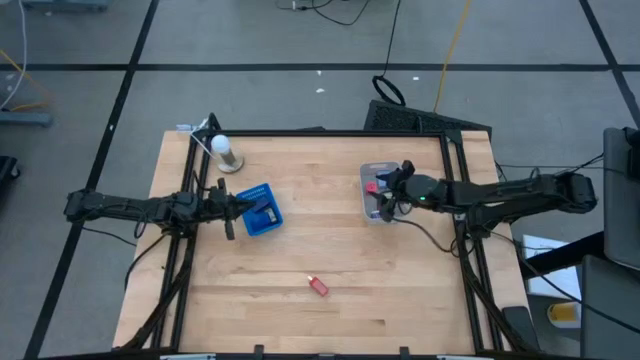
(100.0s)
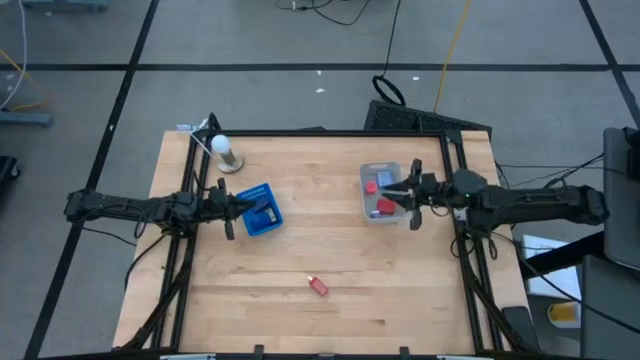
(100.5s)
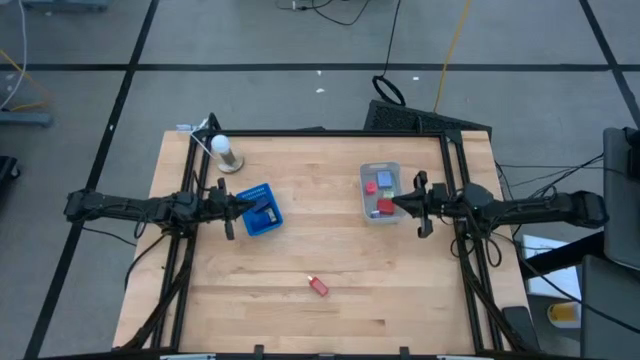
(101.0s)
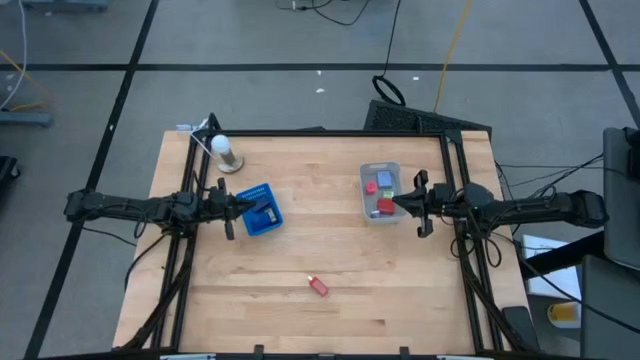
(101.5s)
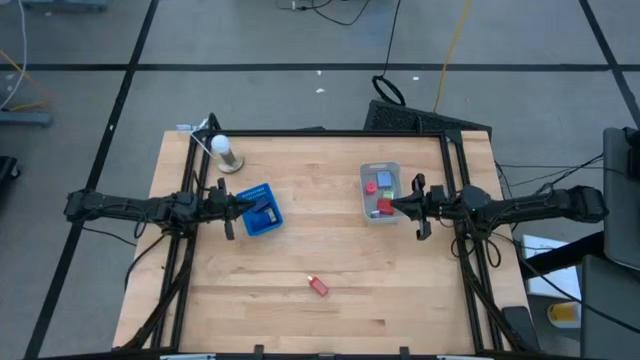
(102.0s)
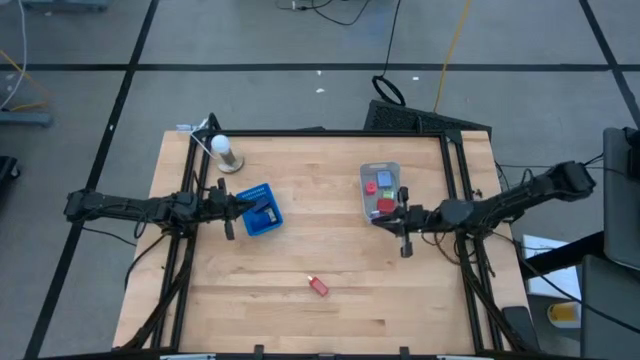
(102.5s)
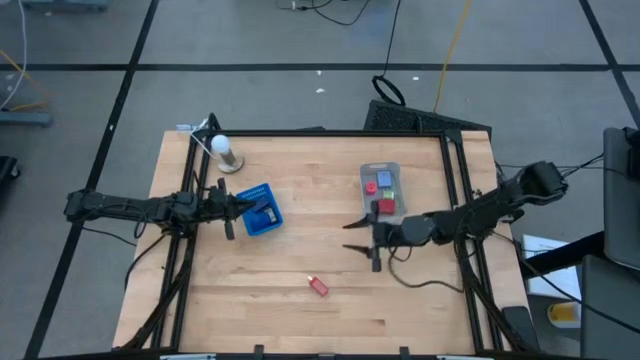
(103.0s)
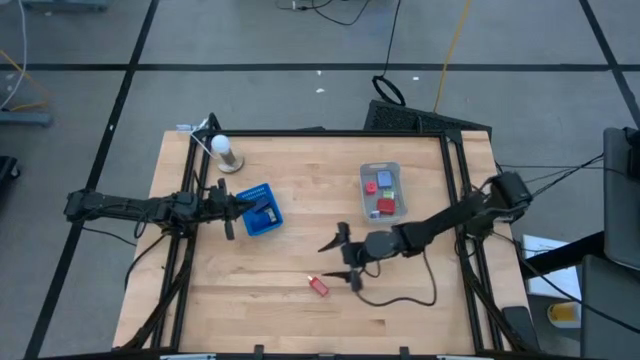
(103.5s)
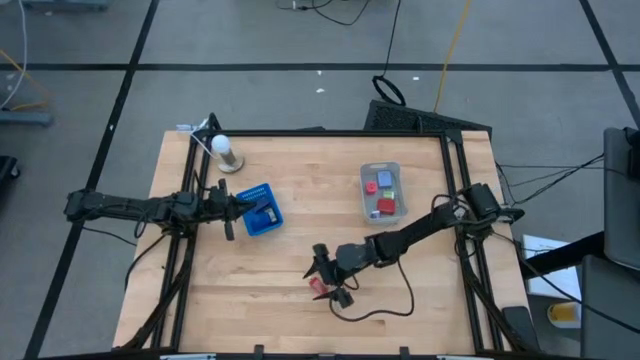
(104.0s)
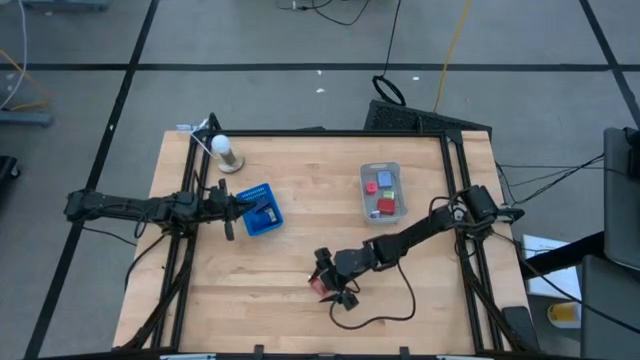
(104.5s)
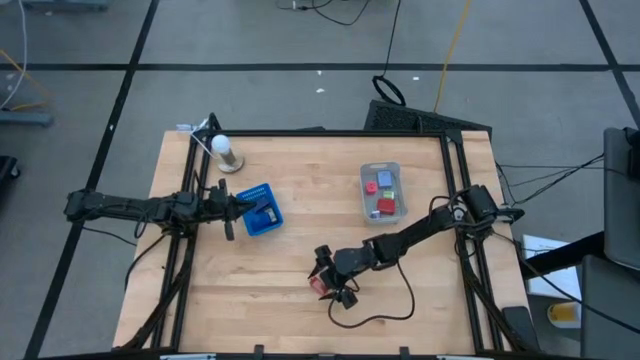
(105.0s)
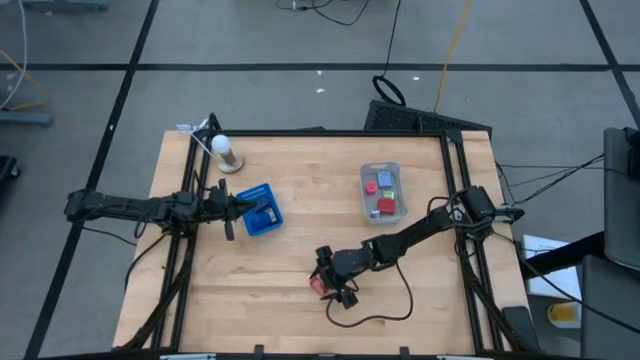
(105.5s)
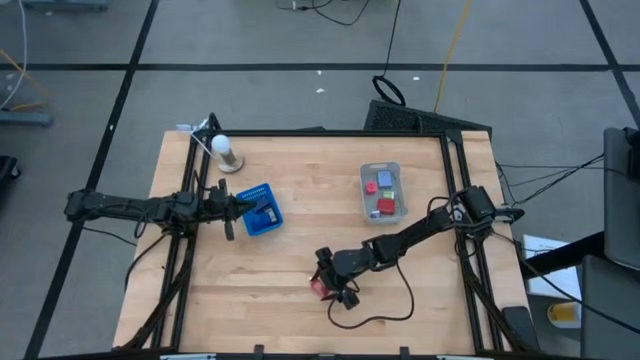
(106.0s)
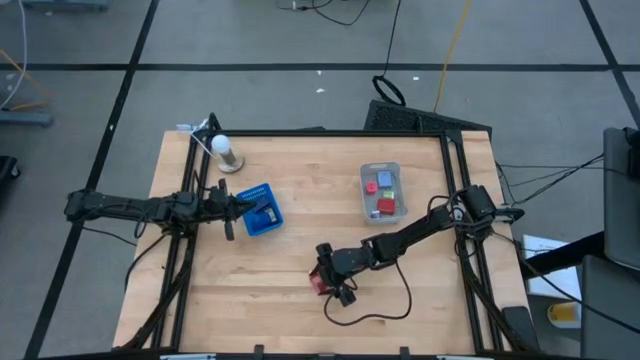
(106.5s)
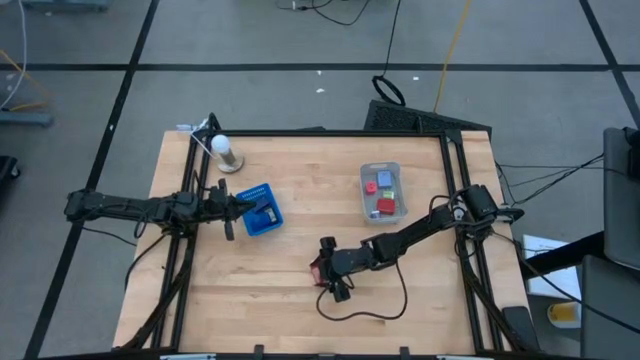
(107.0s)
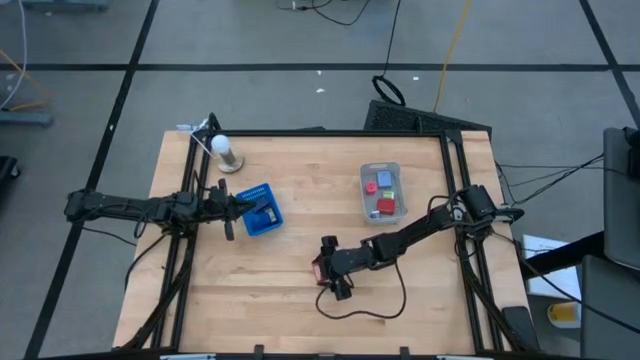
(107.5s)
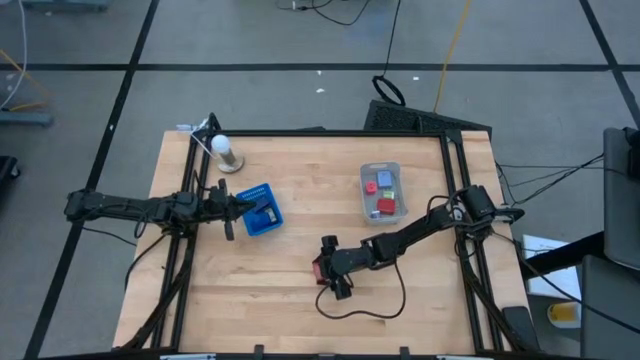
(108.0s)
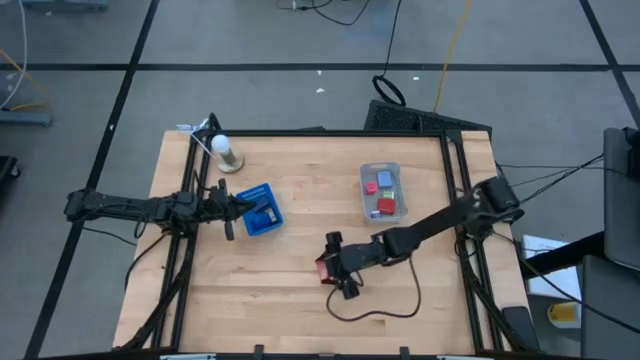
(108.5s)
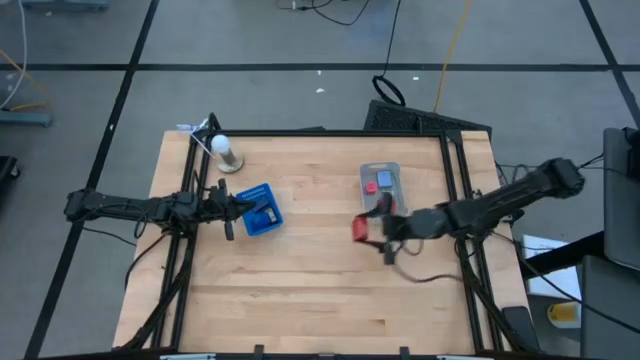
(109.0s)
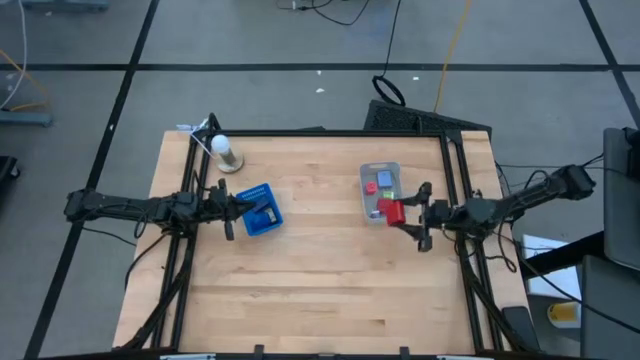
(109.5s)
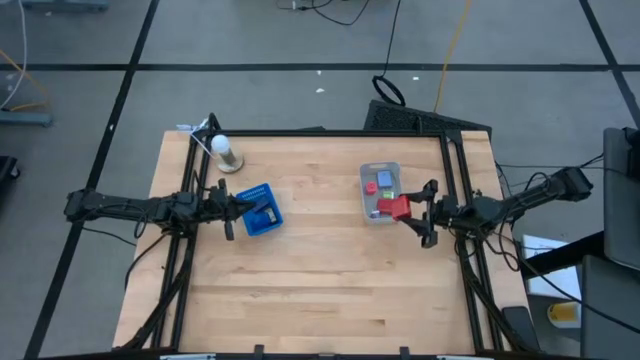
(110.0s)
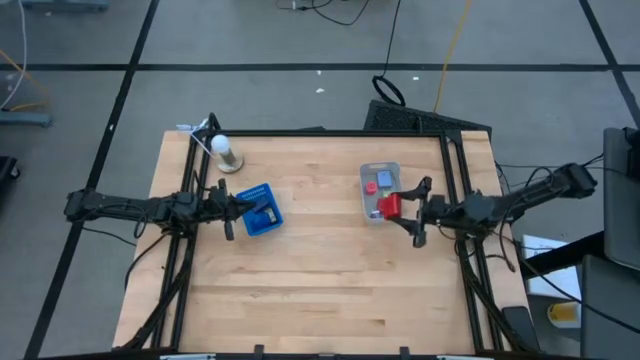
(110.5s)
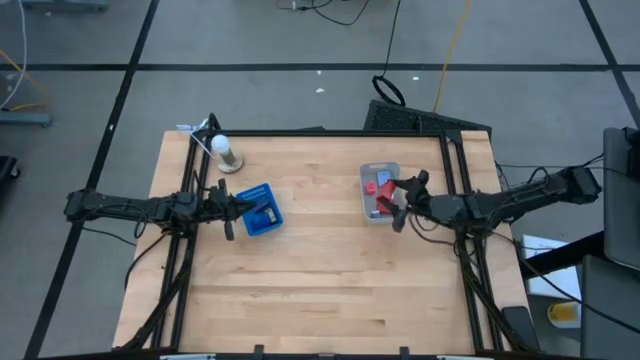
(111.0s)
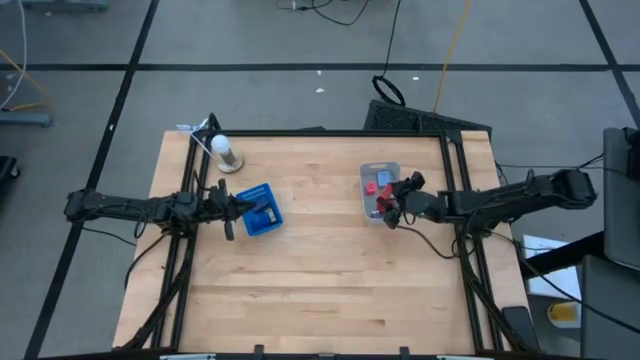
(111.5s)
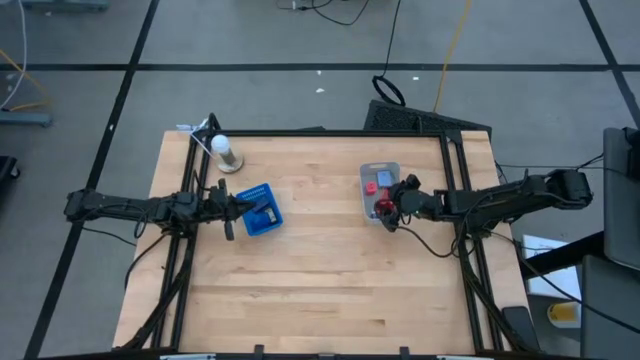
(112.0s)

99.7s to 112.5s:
Task: Pick & Place Office items
Put the red charger adapter into the grey bin

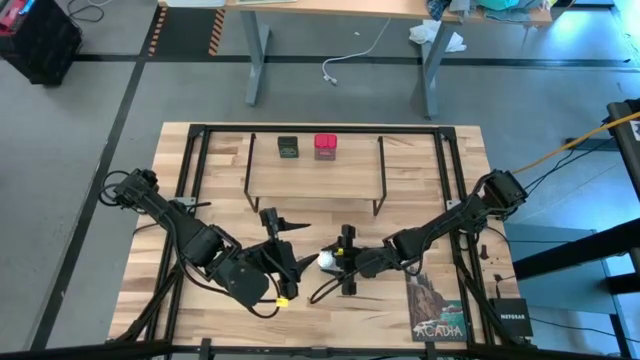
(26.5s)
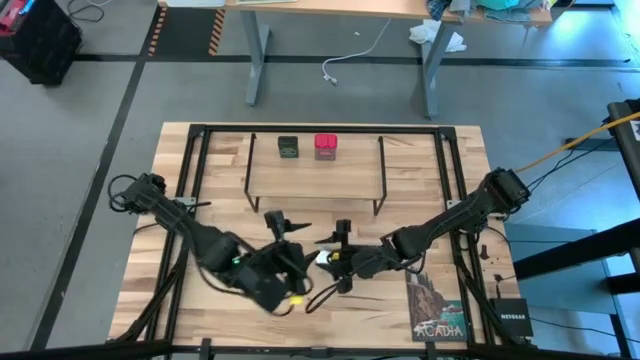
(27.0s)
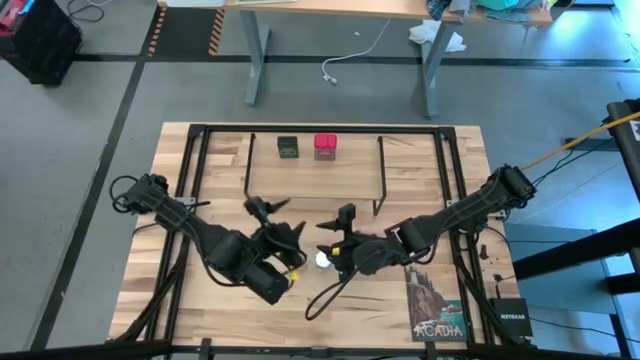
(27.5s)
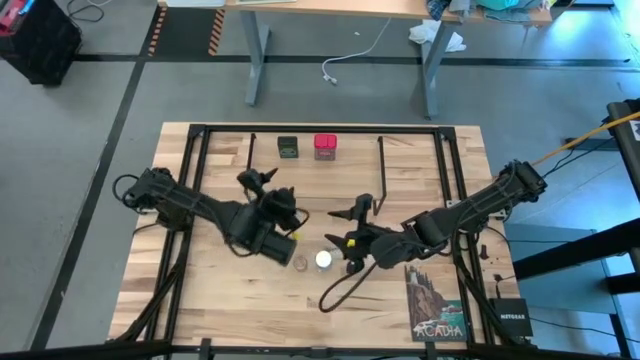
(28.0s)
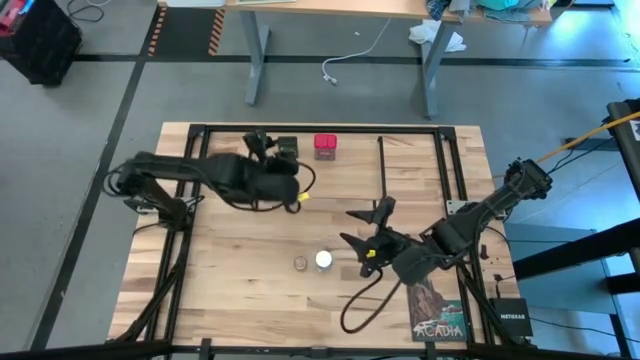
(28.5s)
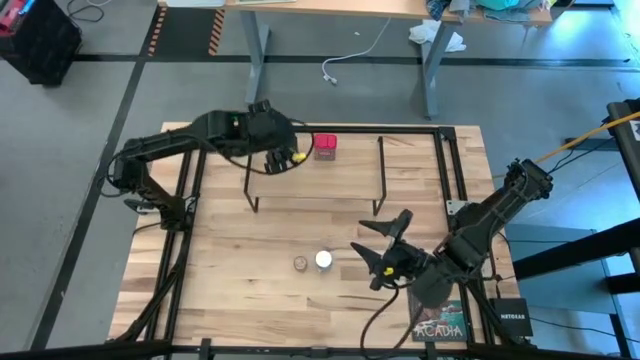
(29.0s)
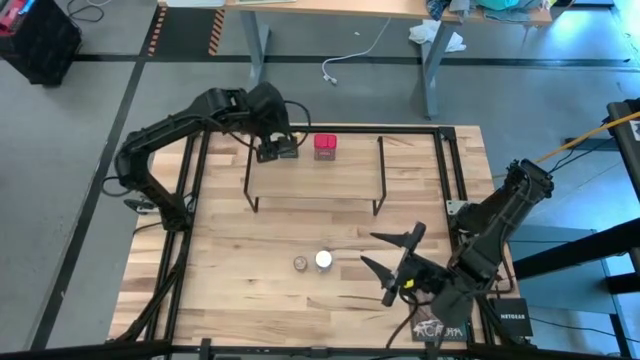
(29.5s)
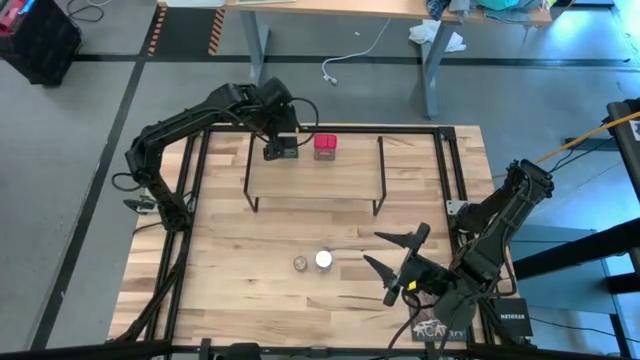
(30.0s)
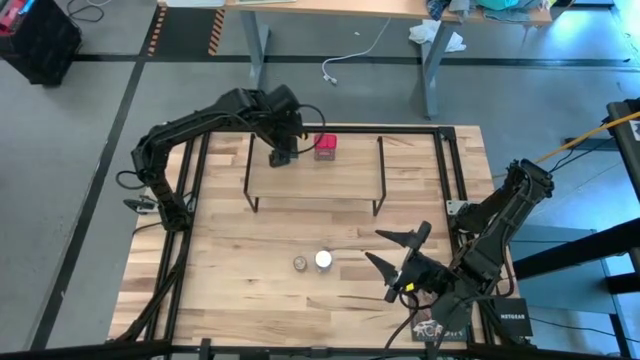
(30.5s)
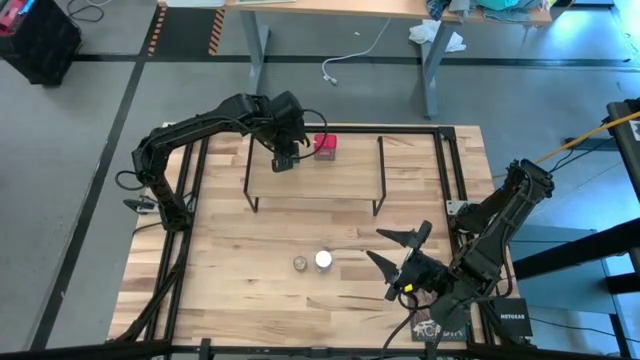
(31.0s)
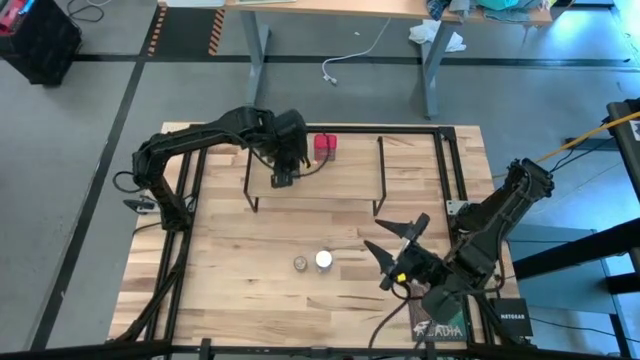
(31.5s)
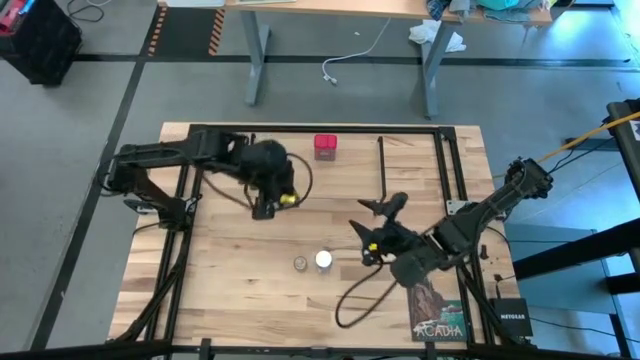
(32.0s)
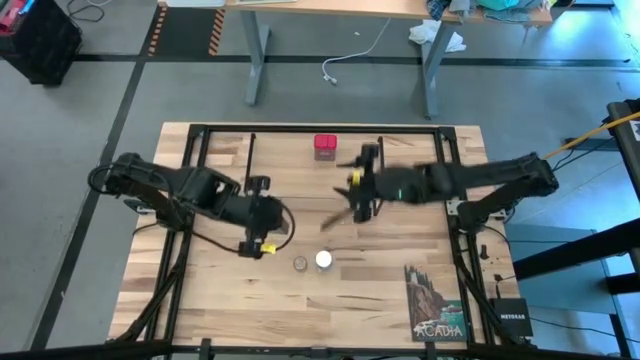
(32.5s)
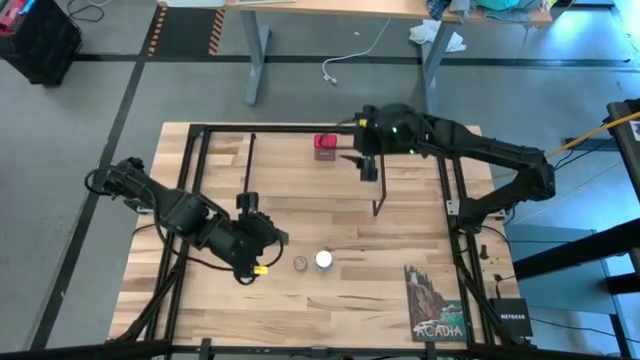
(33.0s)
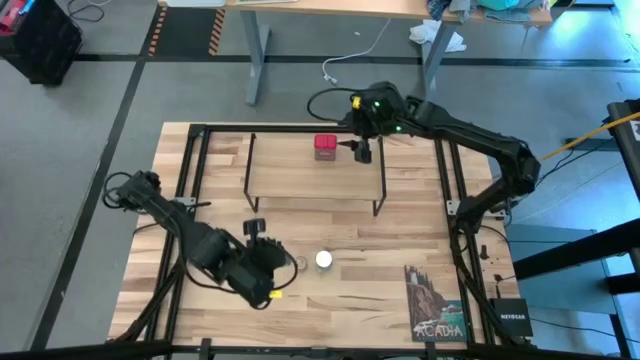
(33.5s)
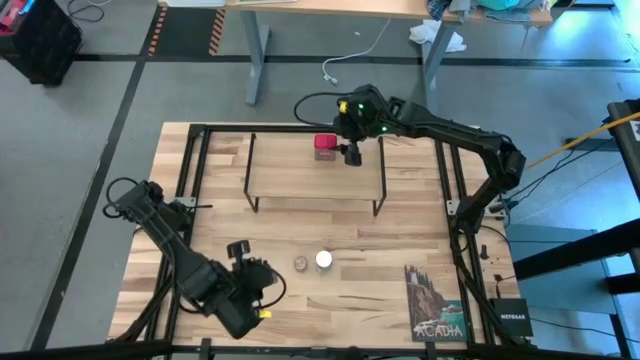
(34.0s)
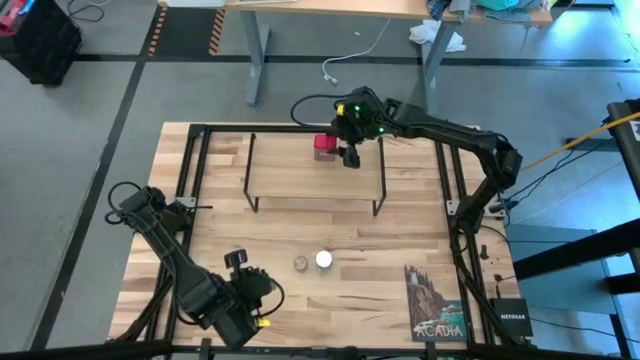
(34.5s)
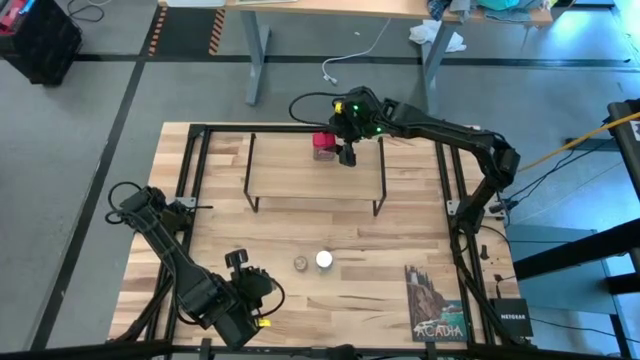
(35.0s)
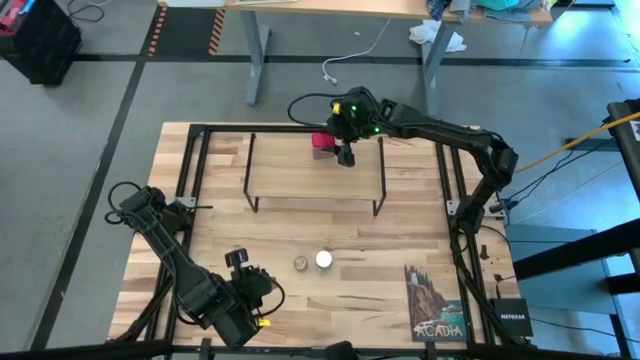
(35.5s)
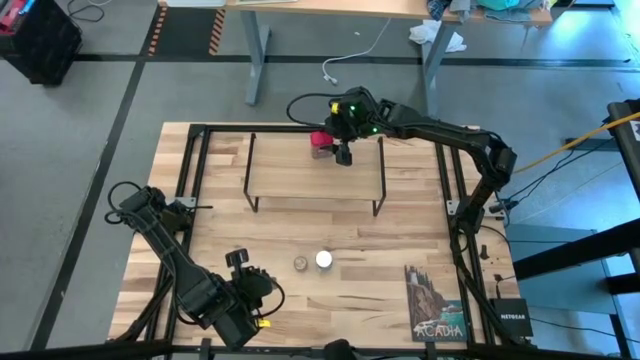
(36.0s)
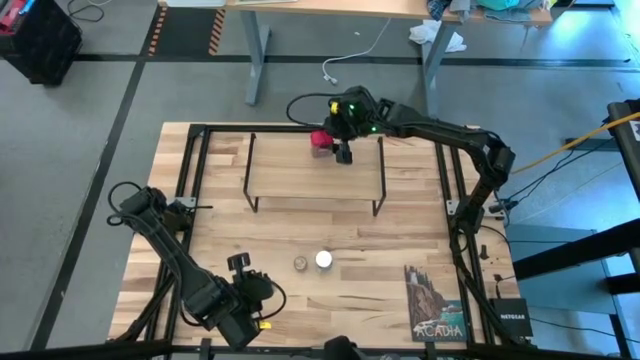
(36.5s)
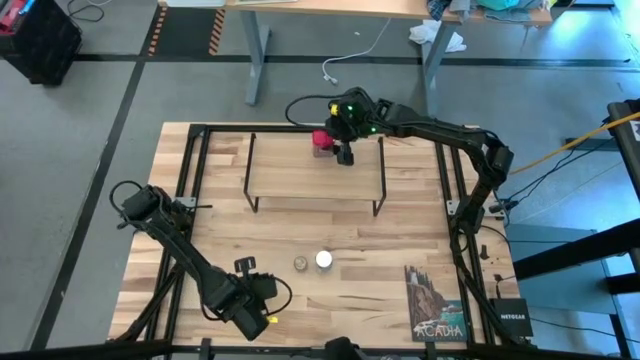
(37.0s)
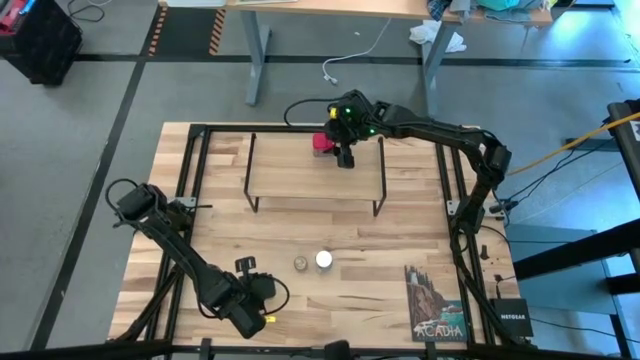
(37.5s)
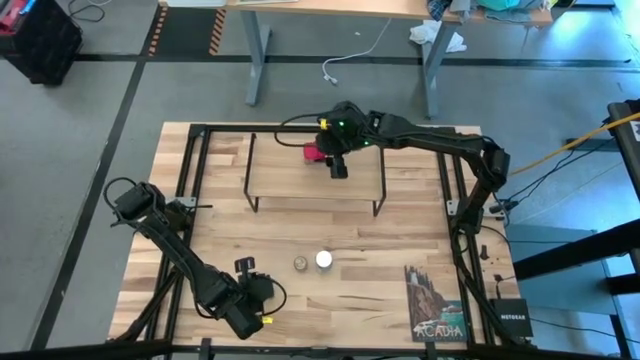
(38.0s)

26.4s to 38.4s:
Task: Shelf spices
Remove the green seasoning can from the shelf
